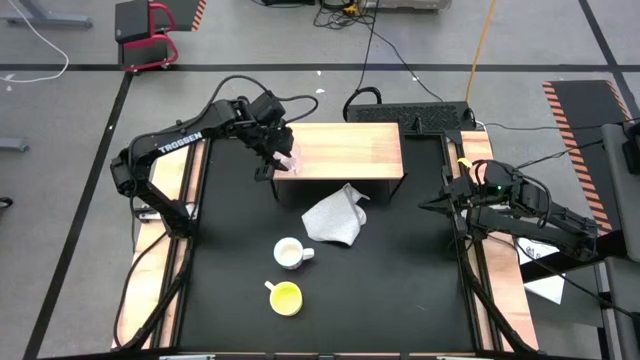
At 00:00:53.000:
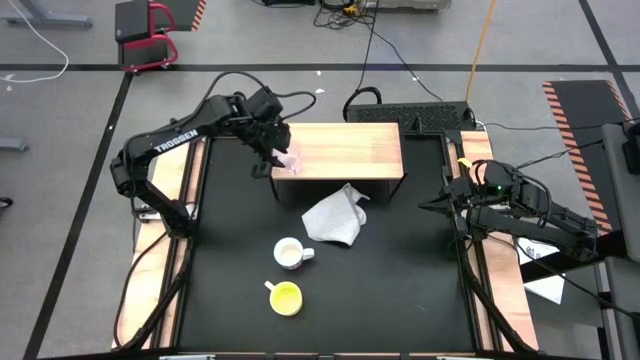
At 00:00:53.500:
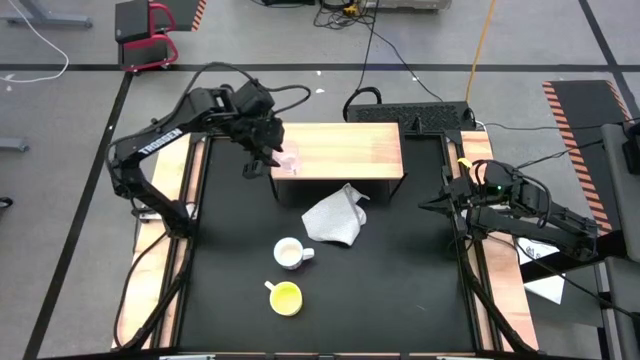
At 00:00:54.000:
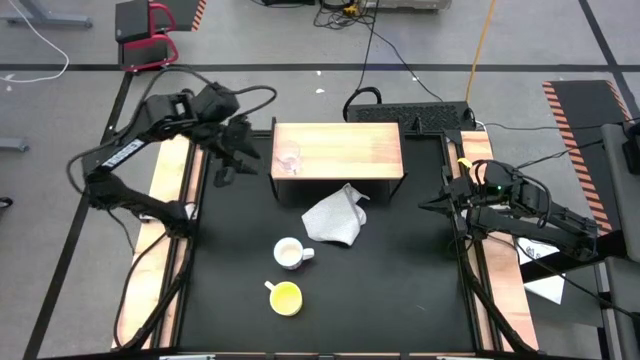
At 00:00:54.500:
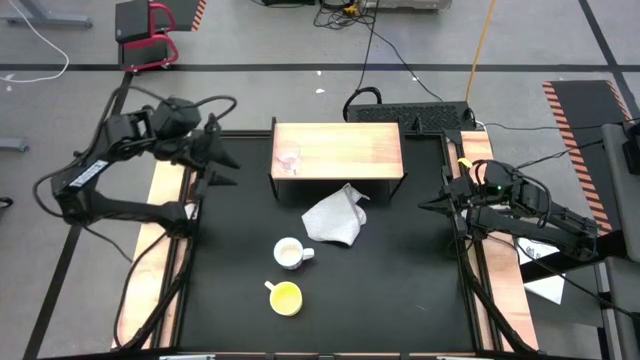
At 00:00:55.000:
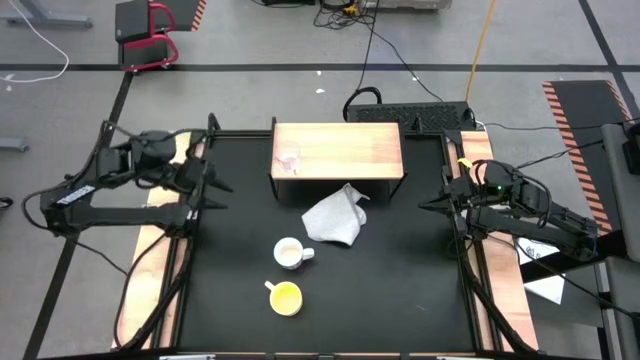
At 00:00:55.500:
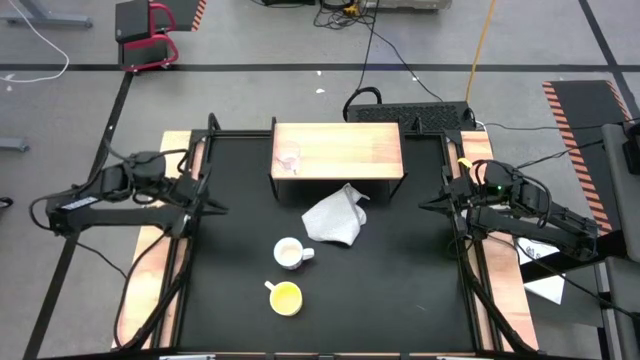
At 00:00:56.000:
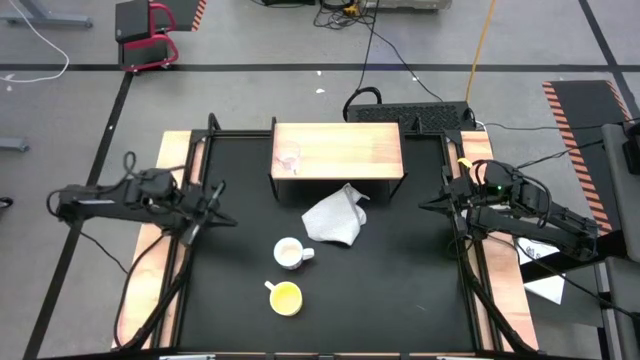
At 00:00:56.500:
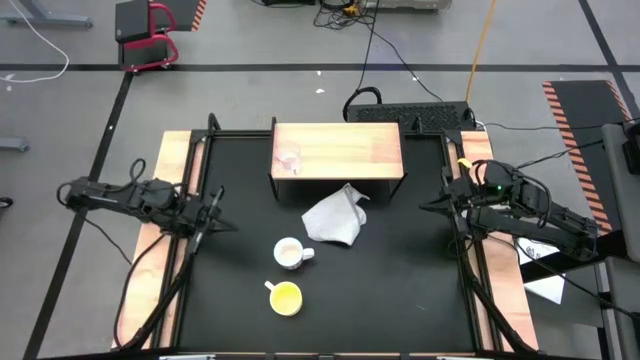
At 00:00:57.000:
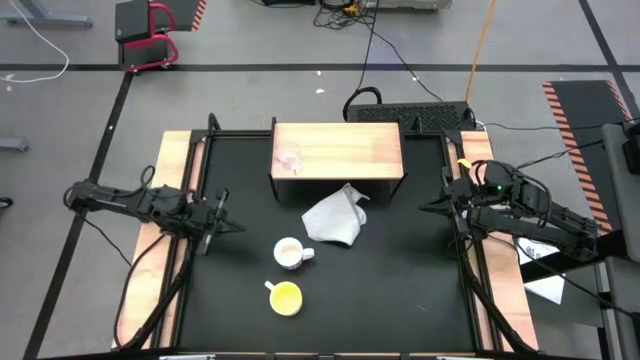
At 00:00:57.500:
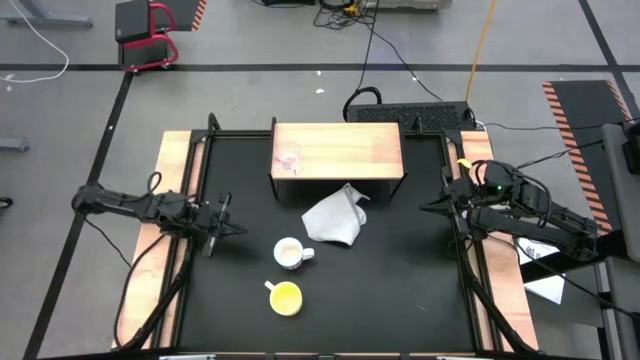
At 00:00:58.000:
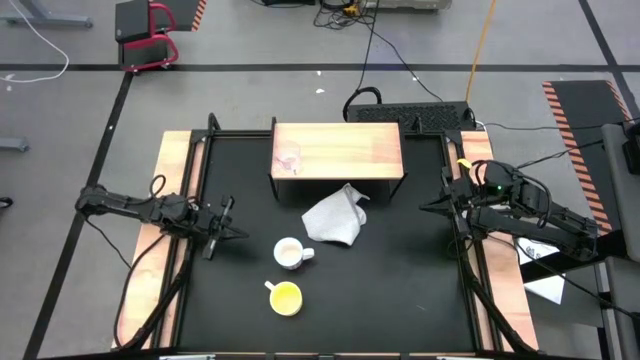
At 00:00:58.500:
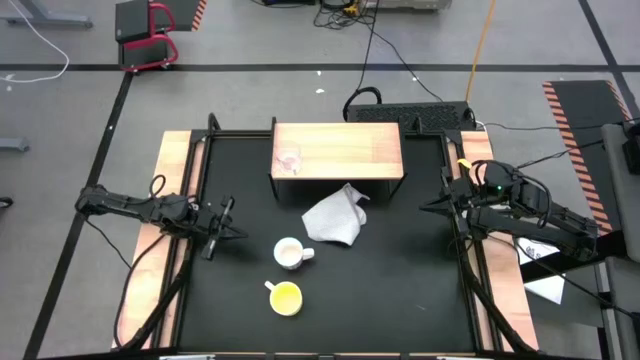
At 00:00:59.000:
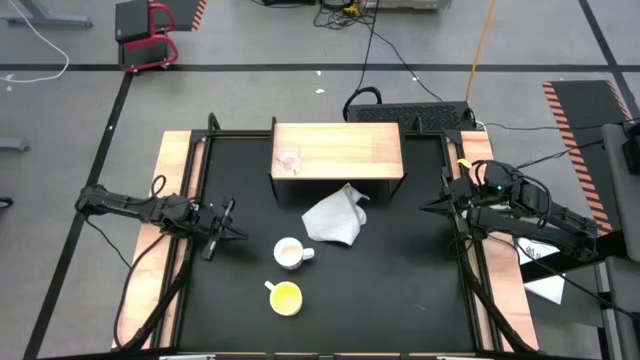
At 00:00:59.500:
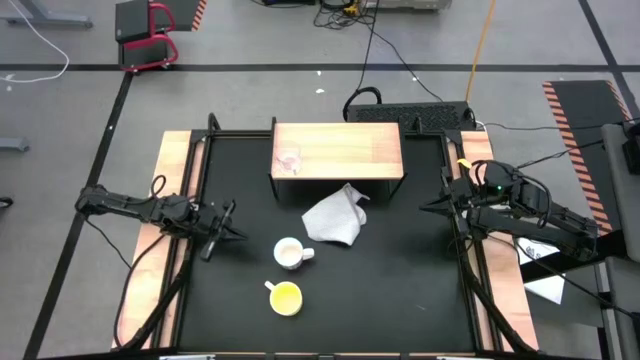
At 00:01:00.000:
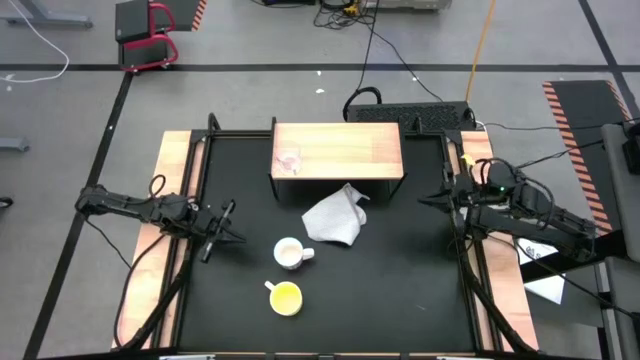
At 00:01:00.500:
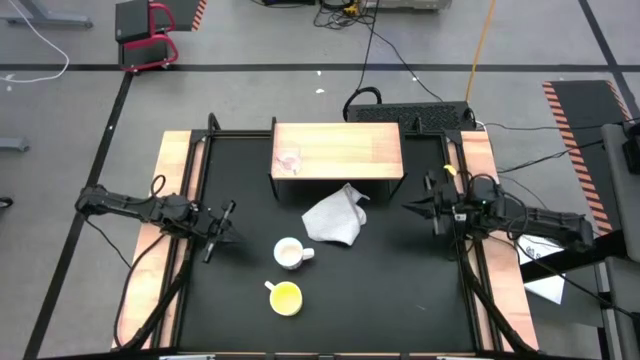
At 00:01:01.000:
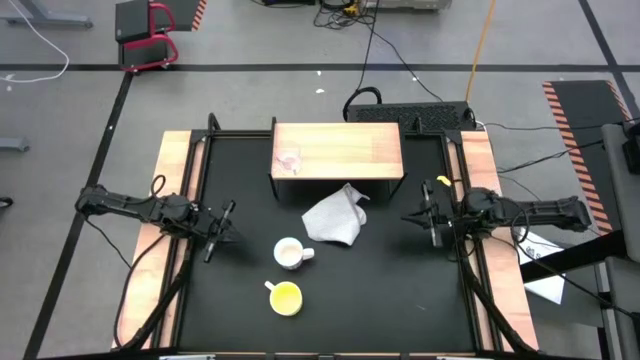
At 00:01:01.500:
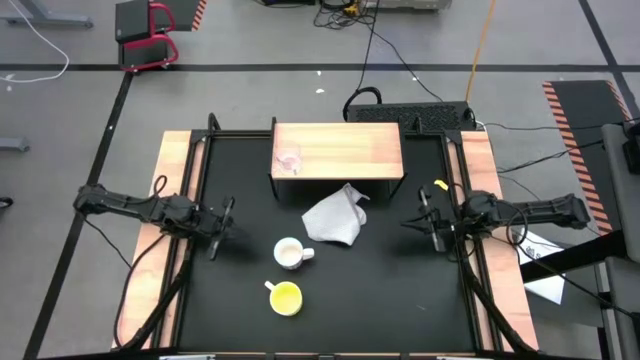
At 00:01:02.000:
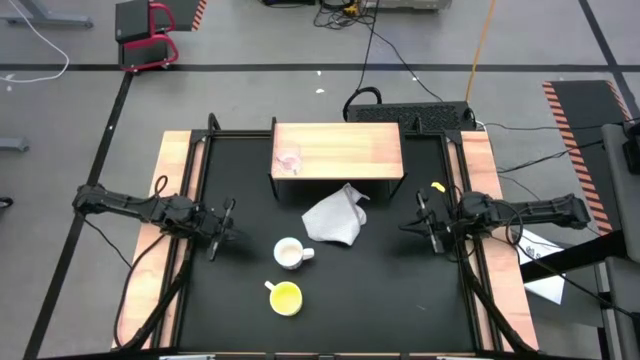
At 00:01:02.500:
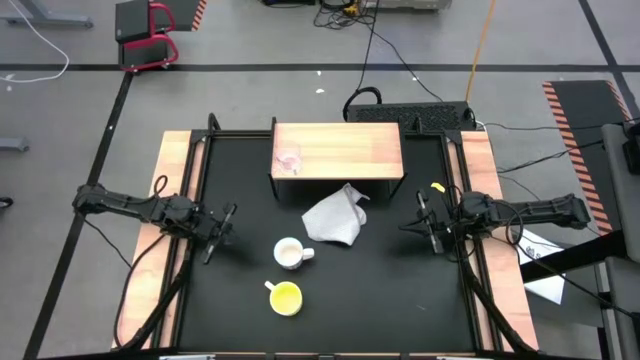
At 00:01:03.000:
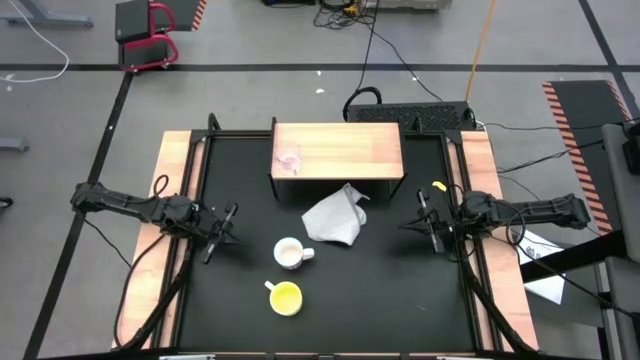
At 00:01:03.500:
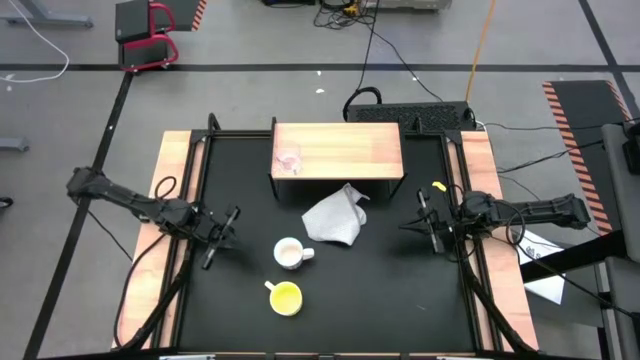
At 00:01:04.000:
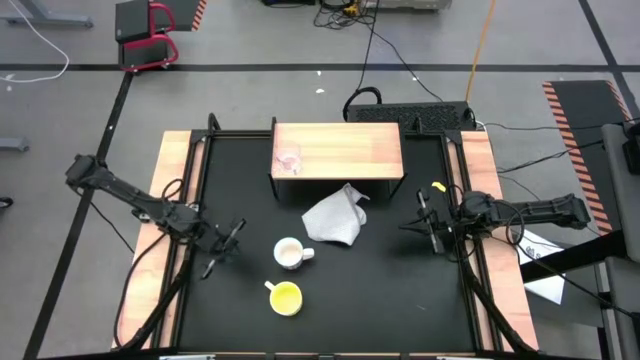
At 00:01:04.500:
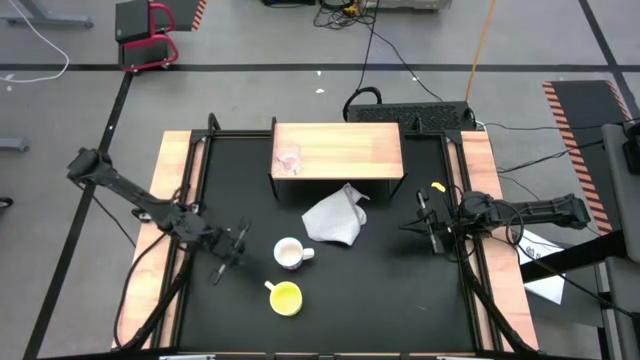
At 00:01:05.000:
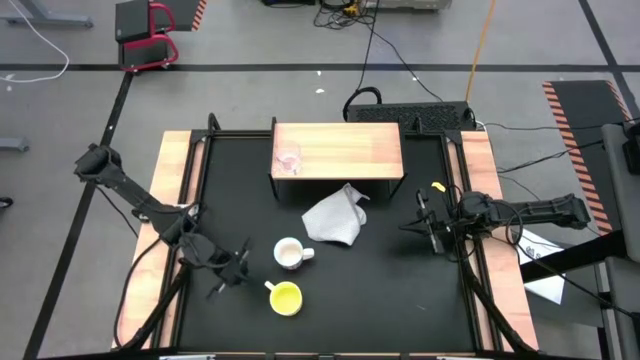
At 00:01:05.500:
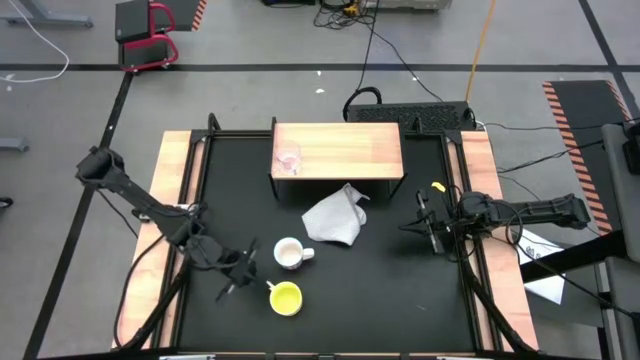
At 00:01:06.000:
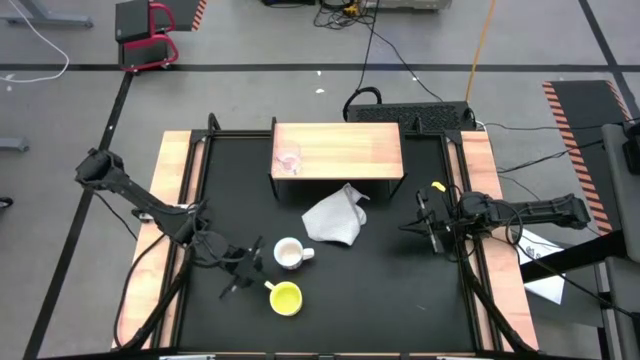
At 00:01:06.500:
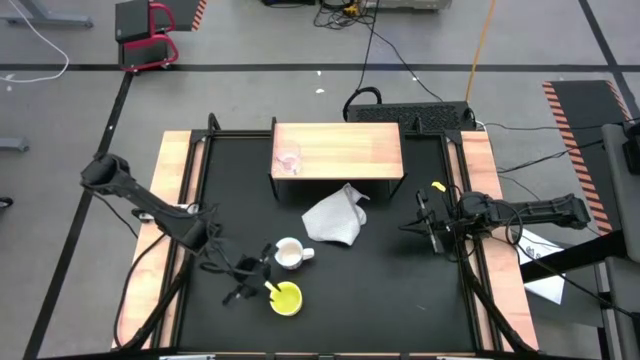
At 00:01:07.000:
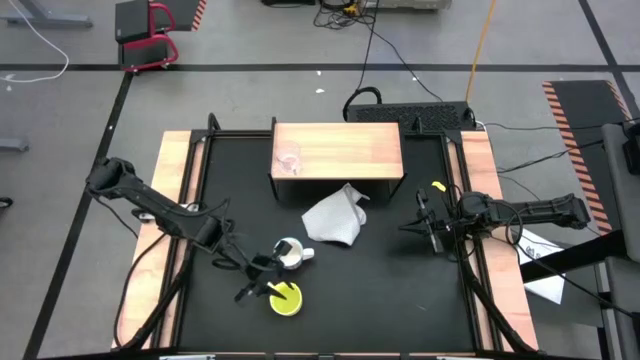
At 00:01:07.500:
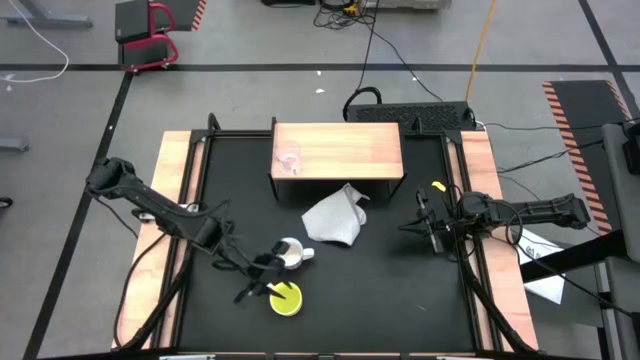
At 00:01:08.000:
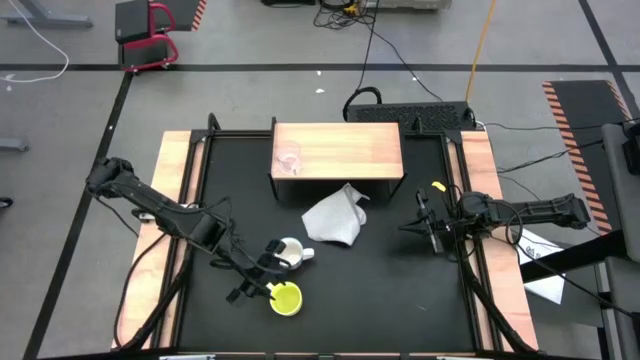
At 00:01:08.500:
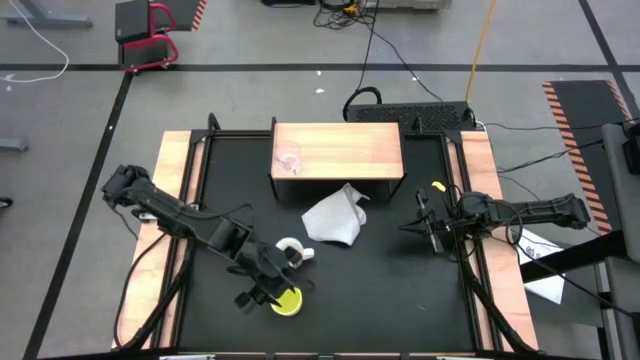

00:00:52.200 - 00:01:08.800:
Task: Stack small to large cups/mugs on shelf
Put the yellow mug on the shelf
